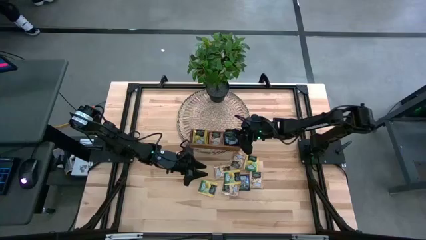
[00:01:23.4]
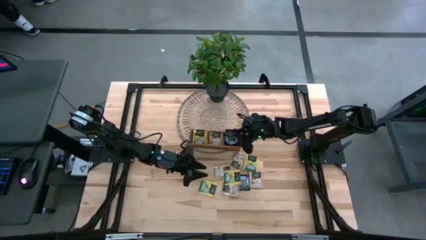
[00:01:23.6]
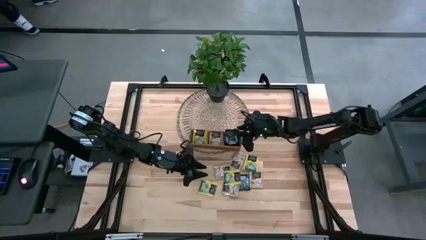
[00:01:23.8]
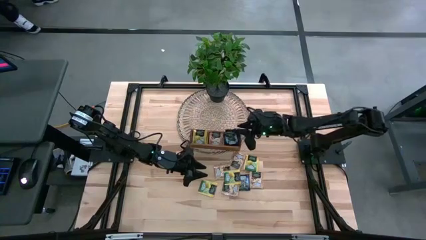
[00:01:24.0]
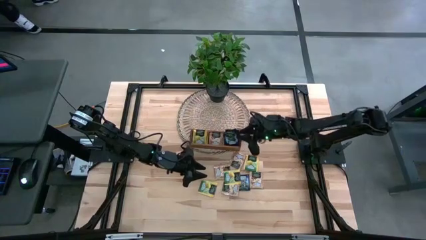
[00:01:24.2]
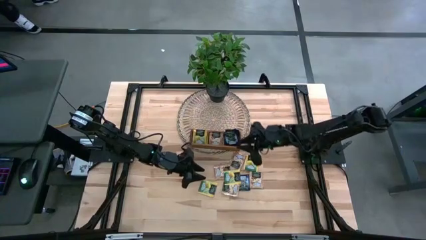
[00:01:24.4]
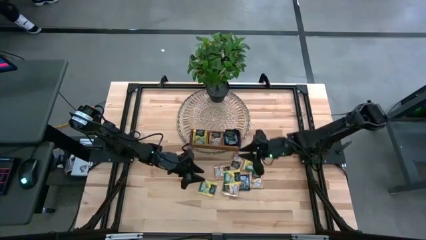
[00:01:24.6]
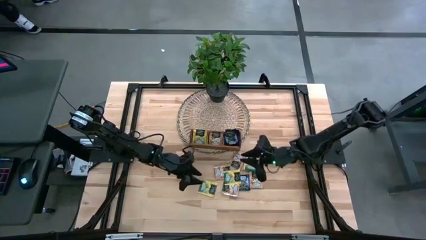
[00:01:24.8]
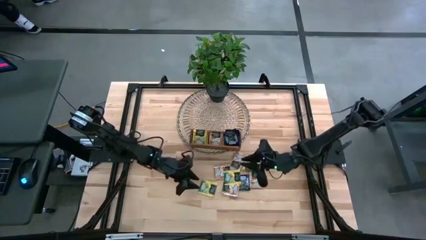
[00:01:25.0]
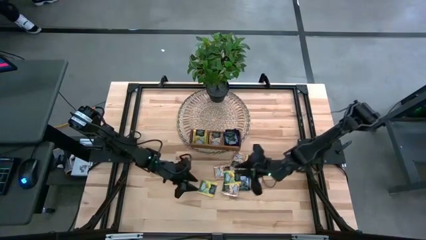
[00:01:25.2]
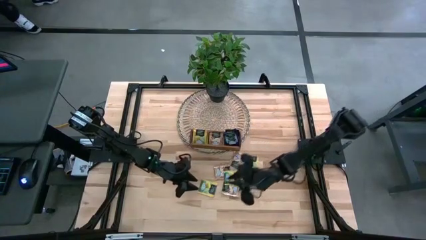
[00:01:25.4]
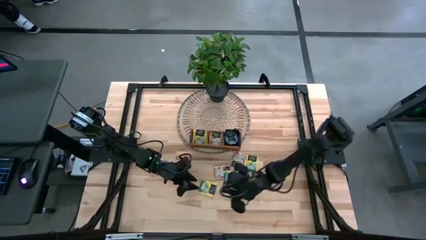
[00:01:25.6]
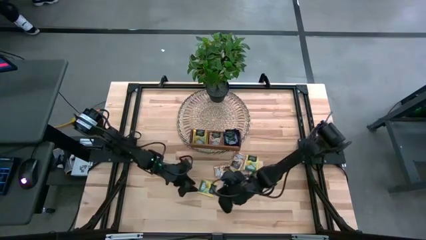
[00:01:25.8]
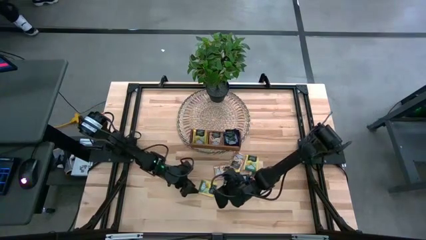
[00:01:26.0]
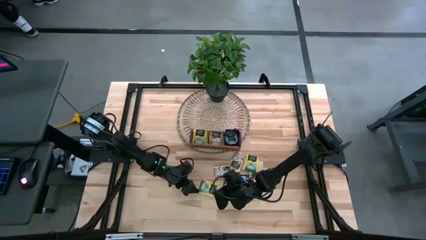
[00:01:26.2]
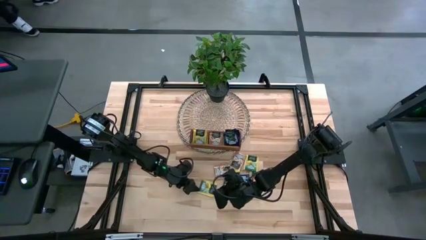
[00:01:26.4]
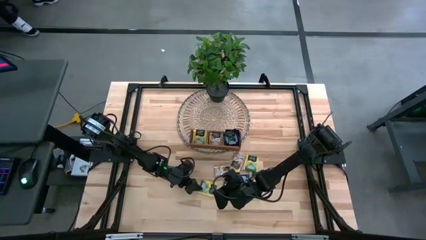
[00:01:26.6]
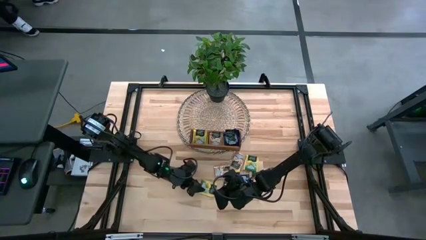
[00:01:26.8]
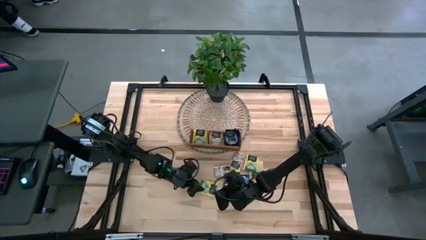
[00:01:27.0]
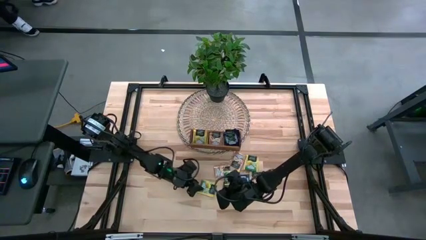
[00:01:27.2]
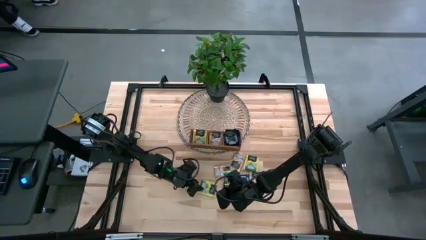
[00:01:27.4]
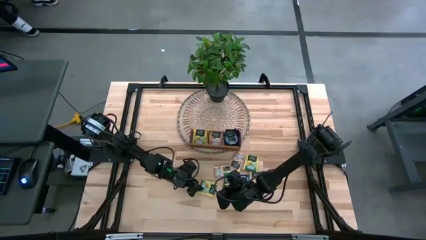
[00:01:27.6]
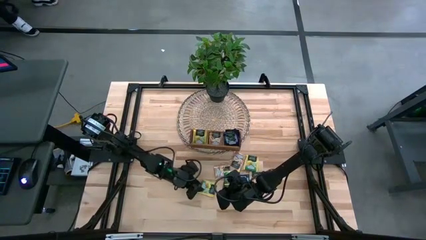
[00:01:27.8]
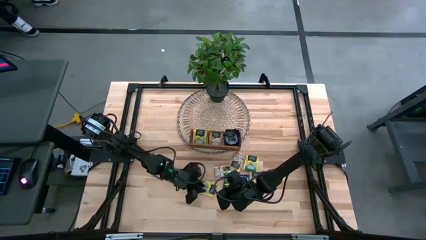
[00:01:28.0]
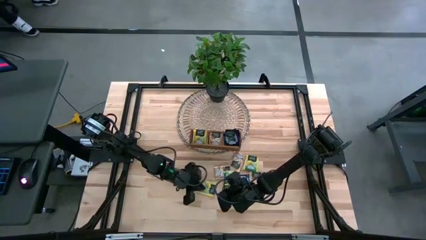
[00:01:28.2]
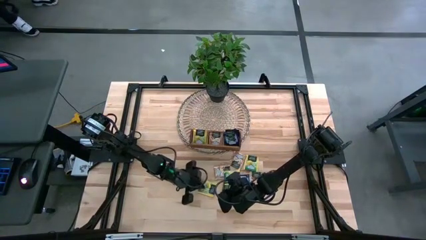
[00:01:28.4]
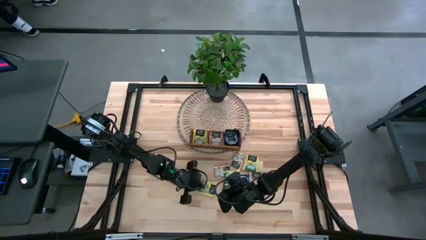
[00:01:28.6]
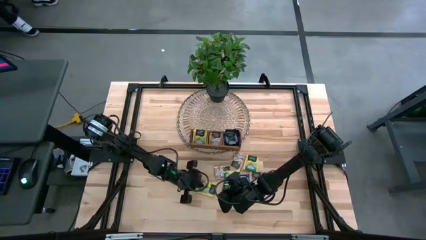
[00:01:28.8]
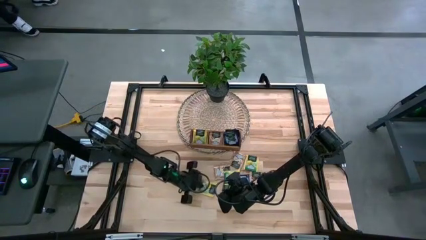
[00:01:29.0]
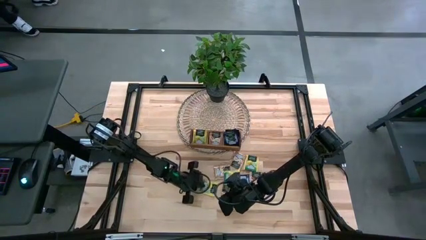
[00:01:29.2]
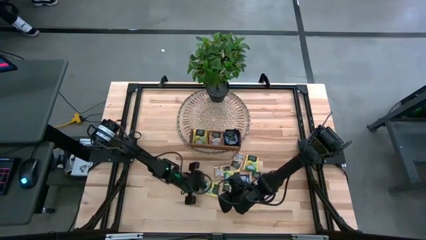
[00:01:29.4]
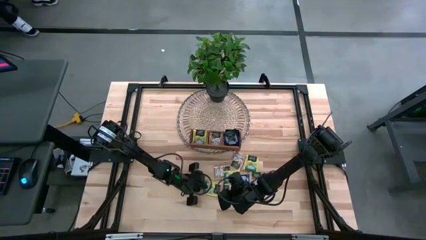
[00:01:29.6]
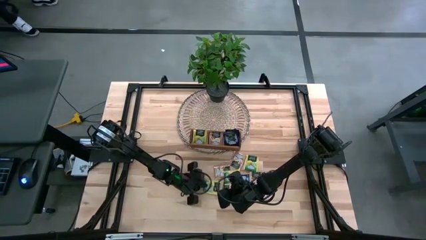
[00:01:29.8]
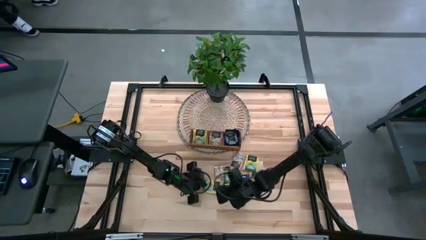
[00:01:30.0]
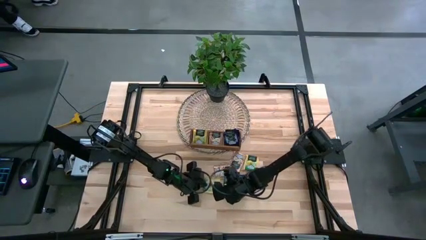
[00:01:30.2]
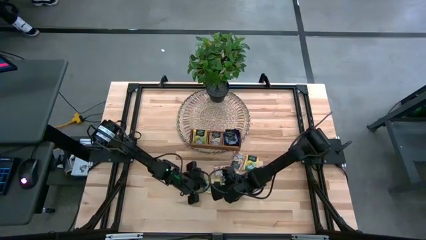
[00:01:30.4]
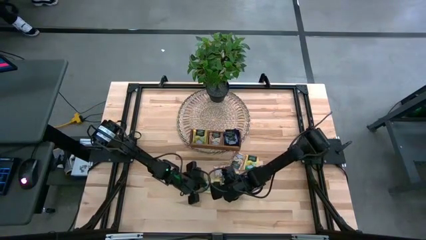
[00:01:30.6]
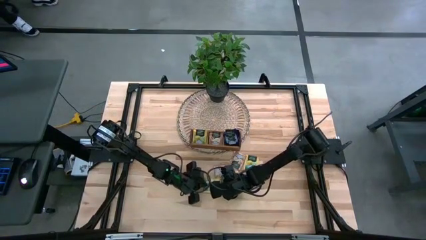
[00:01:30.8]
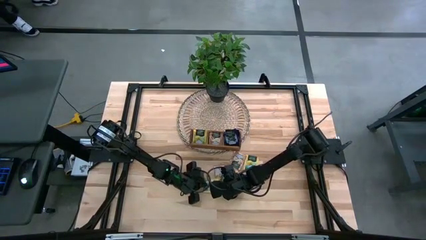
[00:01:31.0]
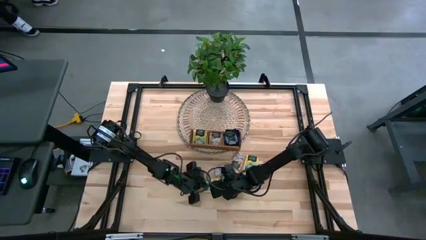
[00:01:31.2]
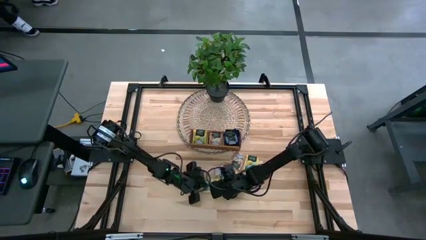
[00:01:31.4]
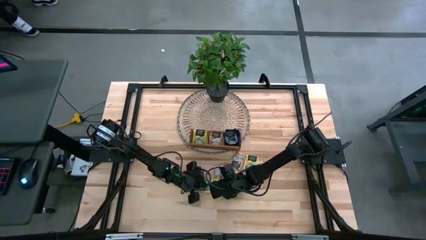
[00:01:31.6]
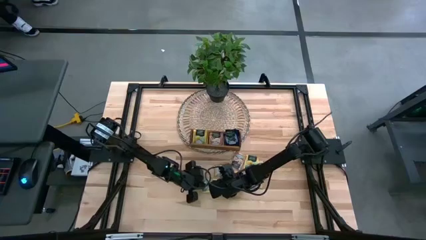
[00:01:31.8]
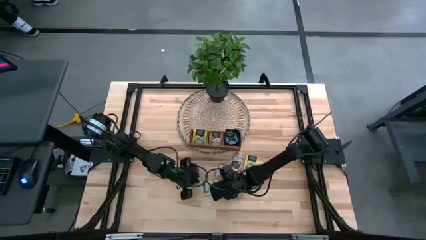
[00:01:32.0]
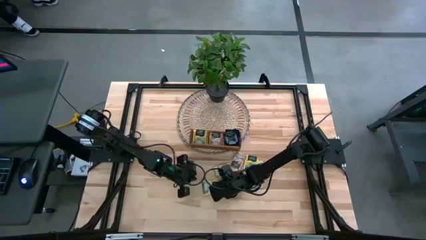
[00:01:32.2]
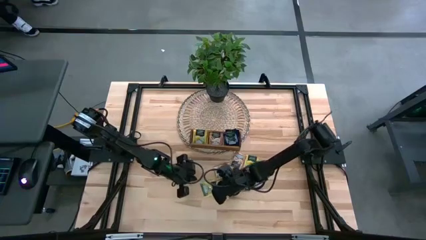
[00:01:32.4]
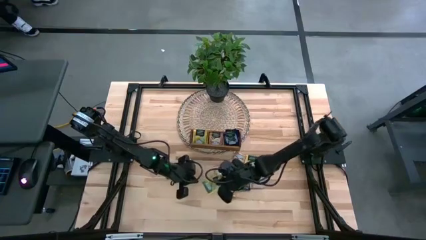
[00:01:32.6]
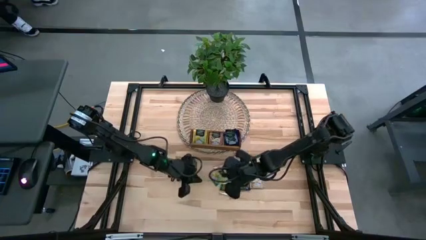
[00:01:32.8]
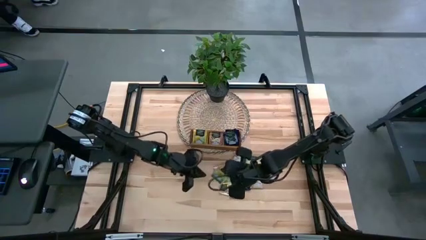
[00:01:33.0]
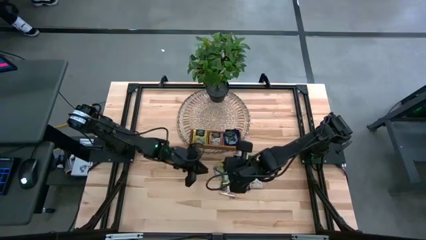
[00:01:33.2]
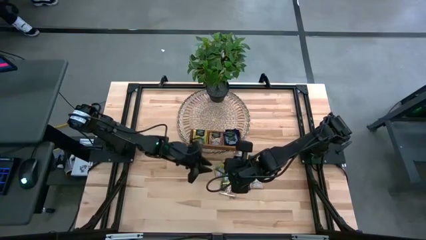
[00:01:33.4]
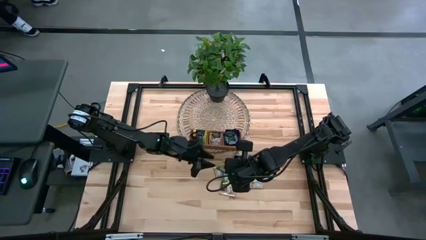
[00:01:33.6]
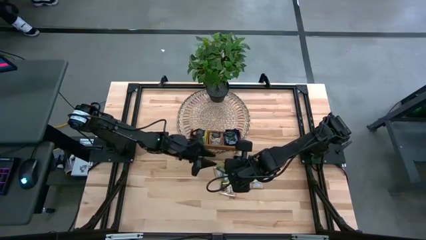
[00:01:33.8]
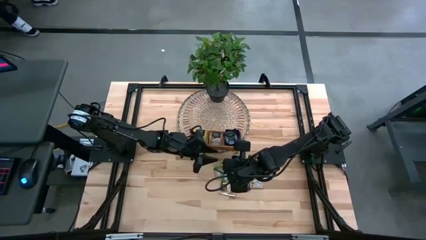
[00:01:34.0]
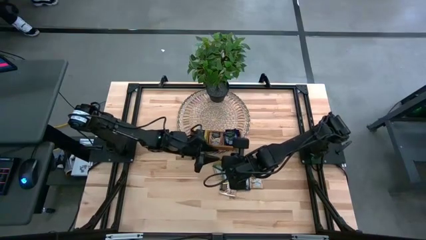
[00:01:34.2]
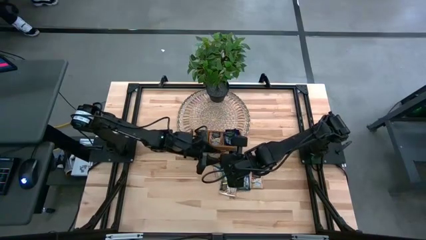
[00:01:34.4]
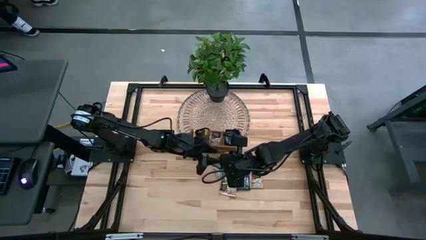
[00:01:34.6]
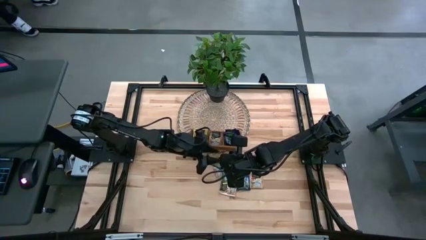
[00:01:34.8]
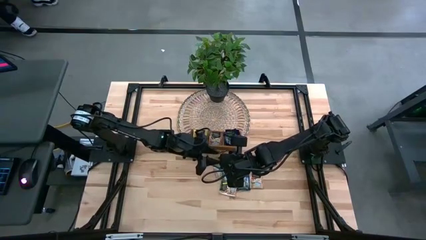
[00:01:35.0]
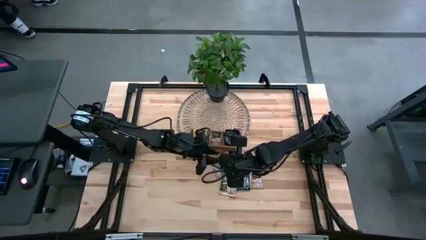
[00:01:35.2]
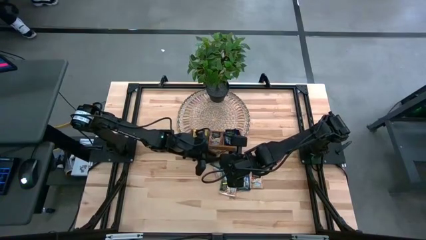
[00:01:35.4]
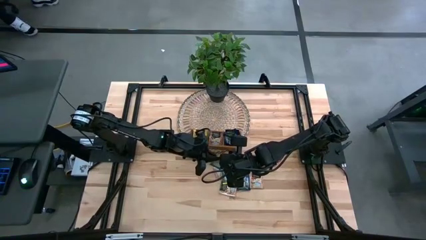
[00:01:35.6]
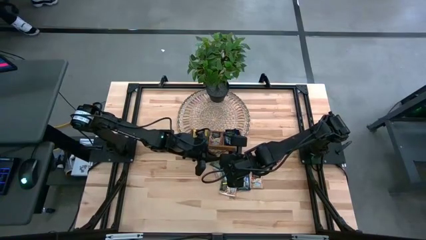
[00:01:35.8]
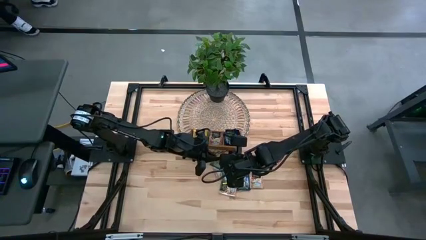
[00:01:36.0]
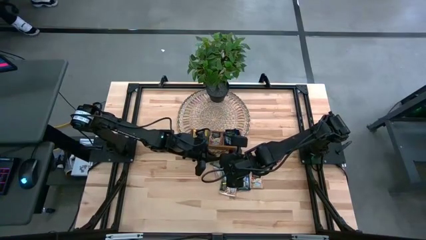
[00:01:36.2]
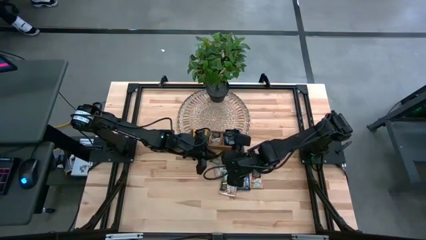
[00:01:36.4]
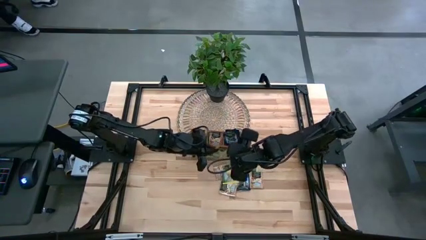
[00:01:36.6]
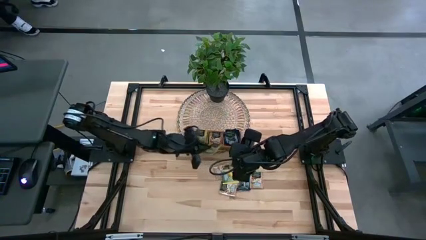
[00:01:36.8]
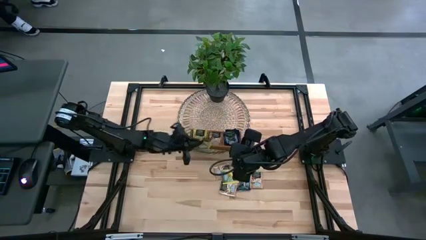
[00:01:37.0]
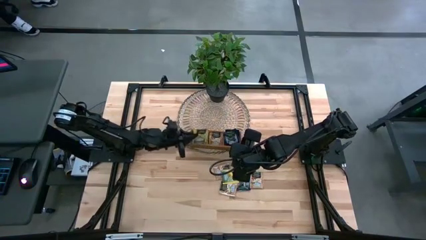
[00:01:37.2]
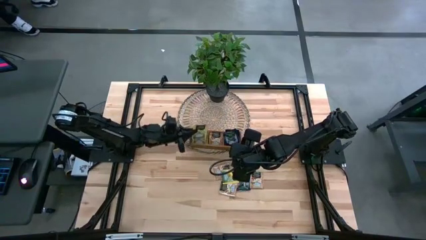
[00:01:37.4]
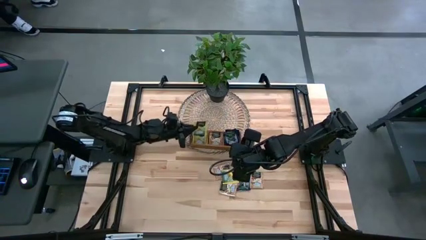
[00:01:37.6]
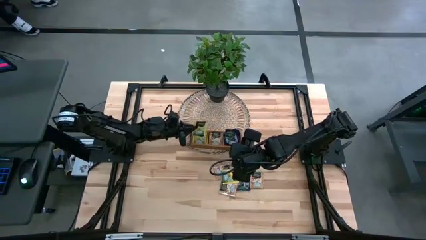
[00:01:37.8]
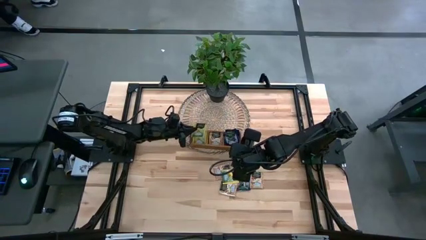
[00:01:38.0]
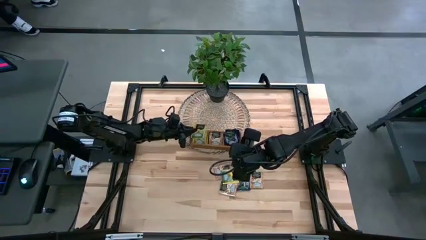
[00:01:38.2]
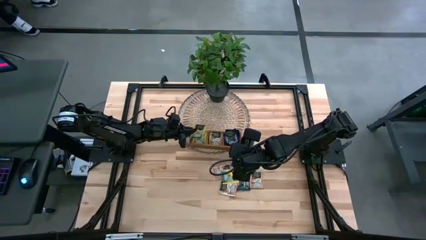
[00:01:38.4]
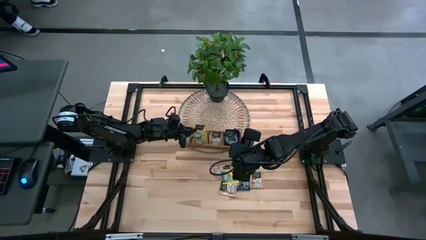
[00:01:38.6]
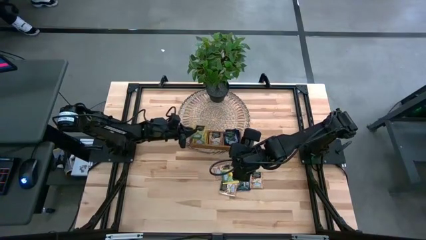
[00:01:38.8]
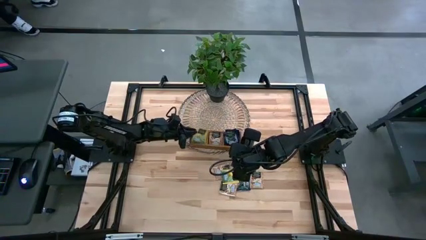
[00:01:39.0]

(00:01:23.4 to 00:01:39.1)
Task: Pick & Place Tea
Put the green tea bag into the left section of the wooden organizer
